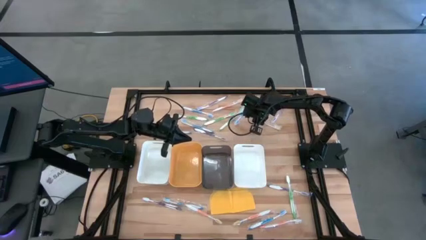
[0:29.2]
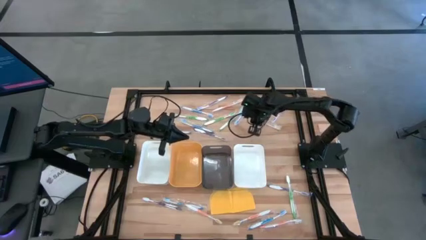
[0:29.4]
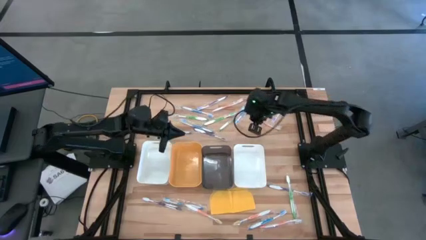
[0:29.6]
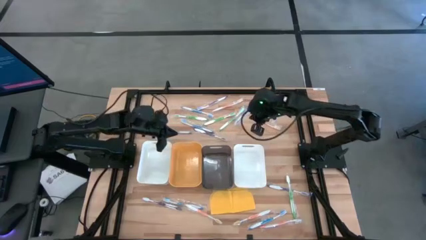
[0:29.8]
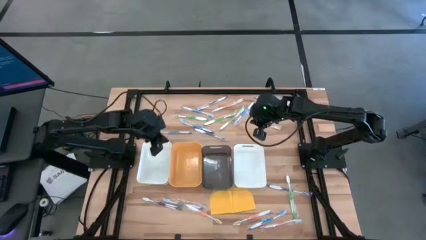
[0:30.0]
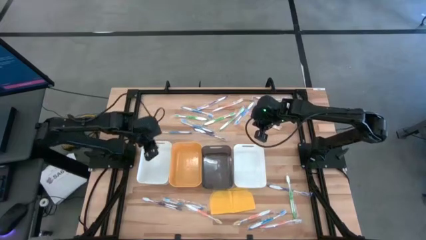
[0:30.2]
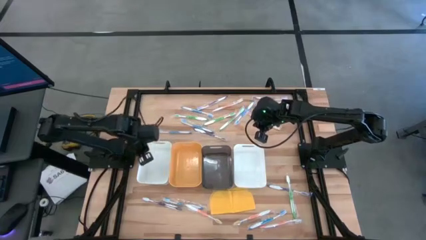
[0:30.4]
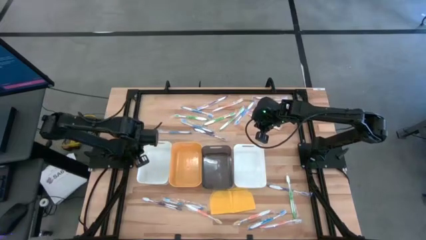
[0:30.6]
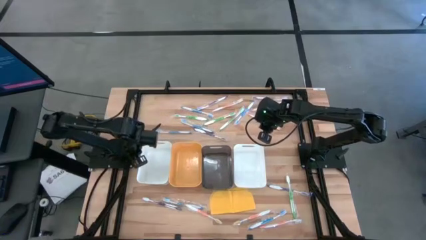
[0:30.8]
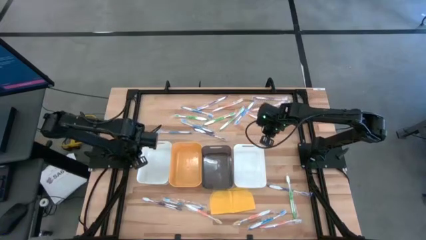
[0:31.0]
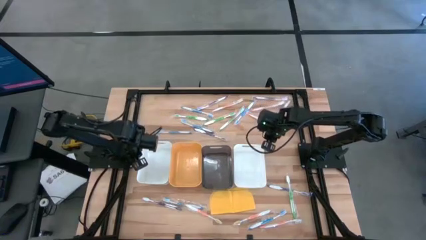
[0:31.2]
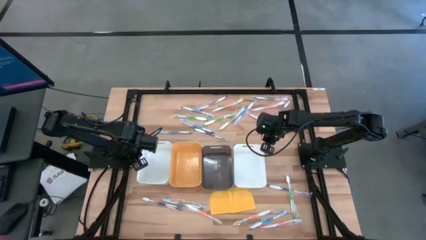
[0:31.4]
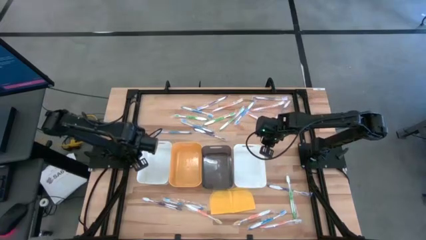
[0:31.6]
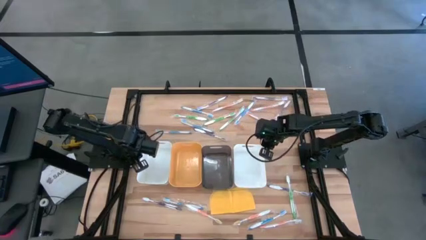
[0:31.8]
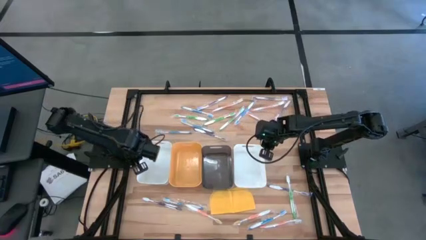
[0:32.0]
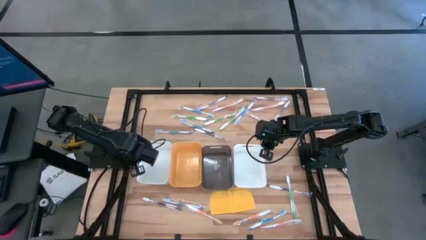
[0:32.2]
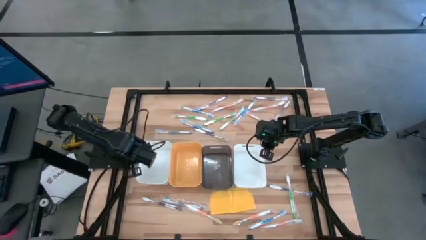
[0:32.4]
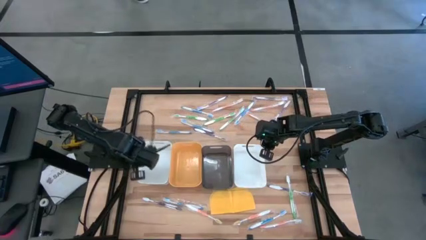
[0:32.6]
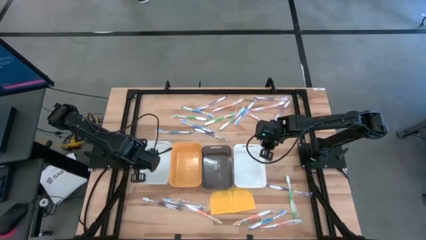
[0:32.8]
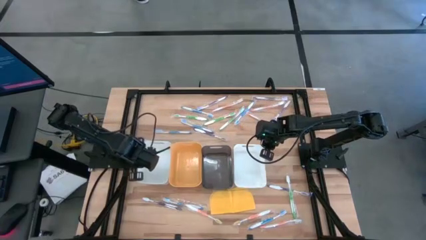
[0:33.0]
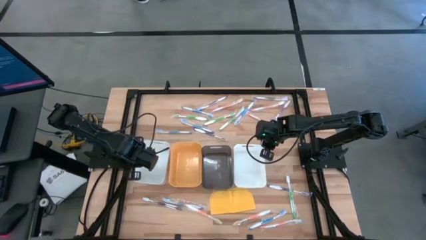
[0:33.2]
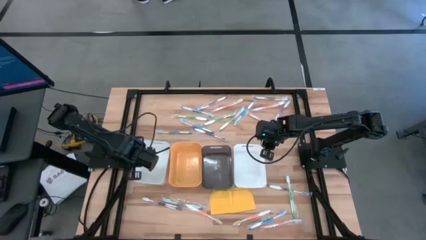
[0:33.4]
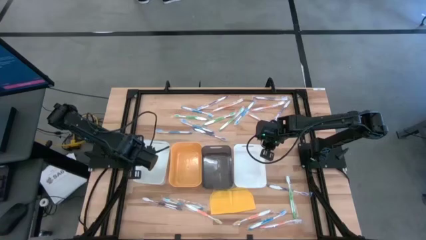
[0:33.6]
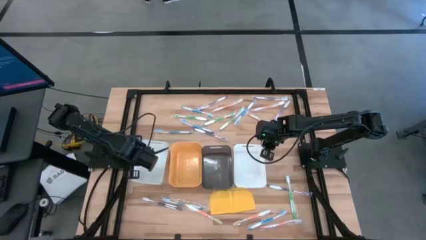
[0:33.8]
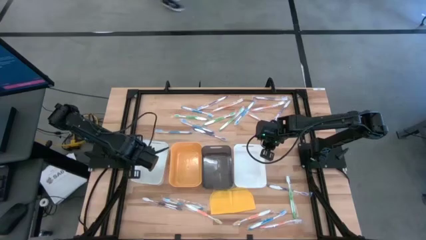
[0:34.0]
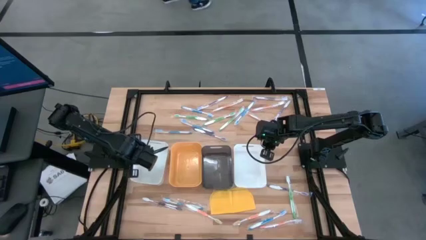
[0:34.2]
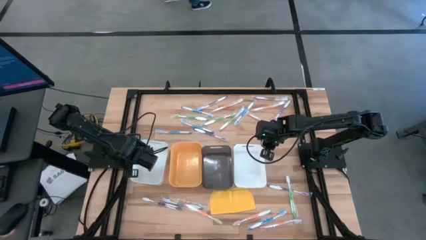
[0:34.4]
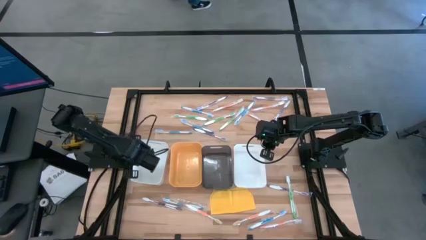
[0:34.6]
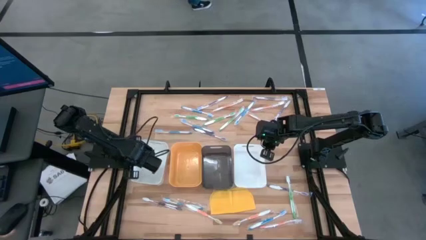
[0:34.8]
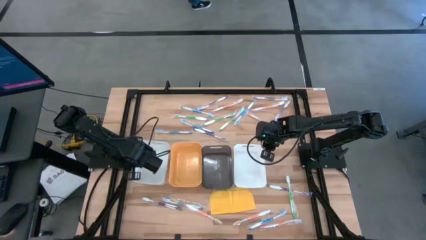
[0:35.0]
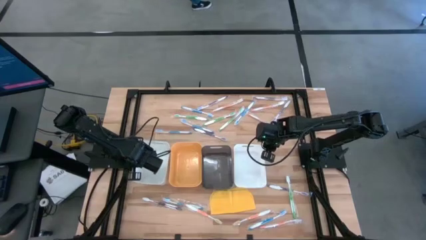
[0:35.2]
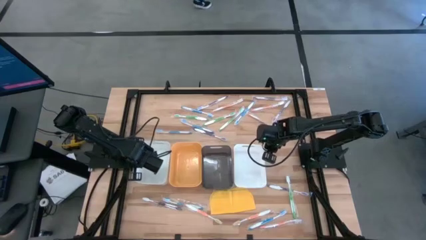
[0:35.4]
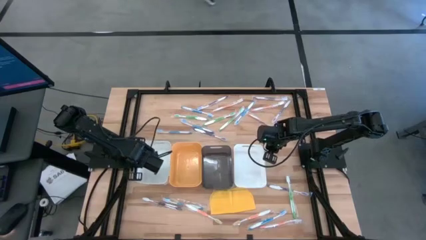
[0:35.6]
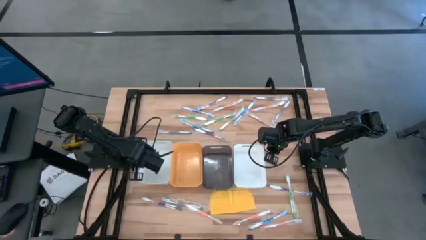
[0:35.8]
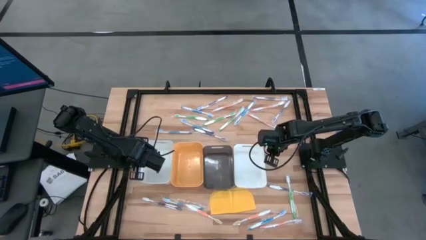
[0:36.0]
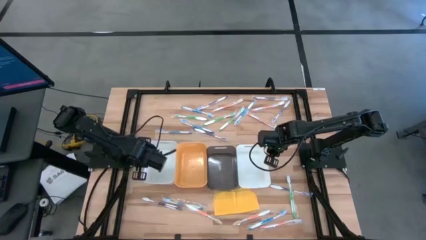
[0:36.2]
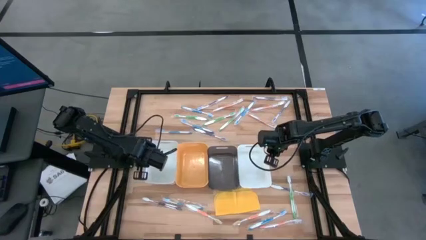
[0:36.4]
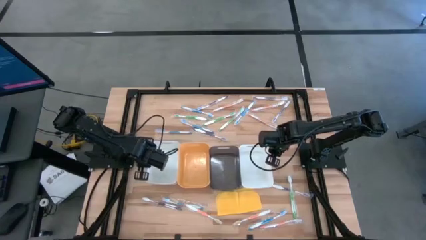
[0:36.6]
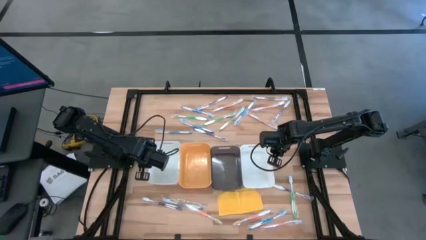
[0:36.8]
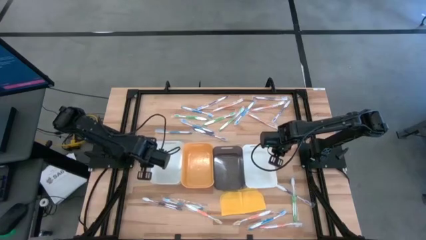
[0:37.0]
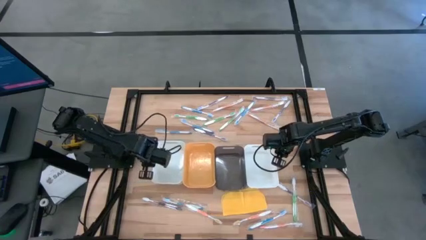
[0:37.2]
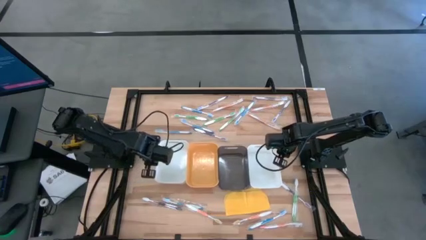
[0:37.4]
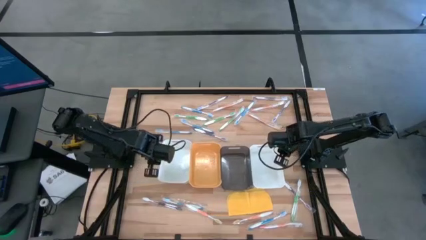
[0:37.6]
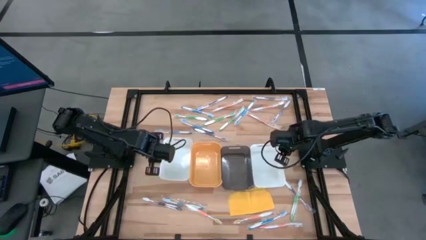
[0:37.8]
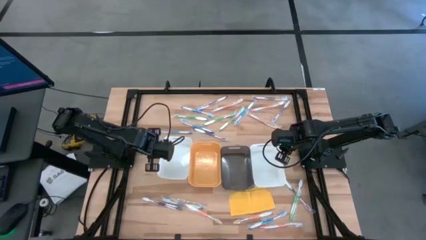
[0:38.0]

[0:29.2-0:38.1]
Task: Pick & Place Toothbrushes
Adjust the bins
